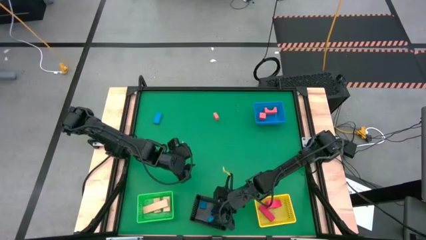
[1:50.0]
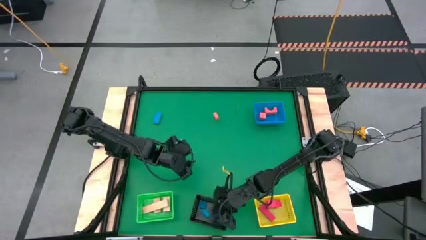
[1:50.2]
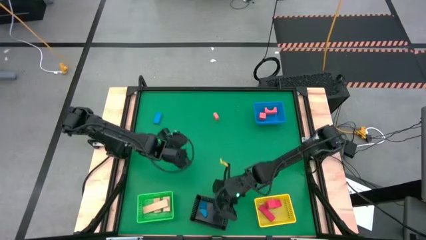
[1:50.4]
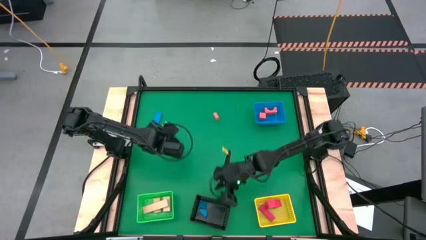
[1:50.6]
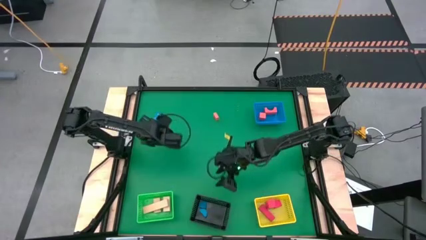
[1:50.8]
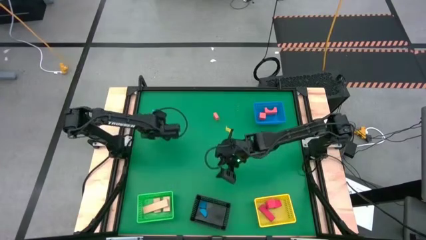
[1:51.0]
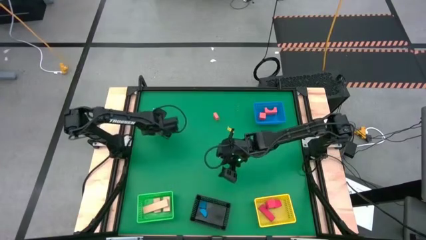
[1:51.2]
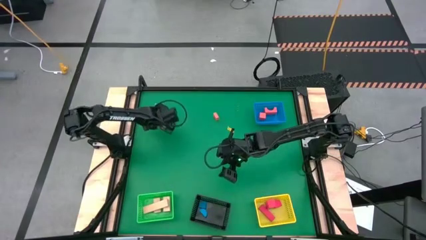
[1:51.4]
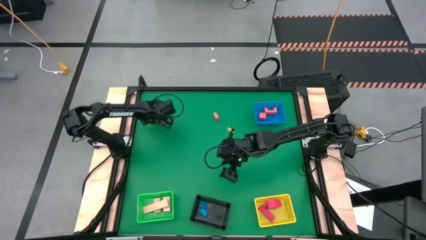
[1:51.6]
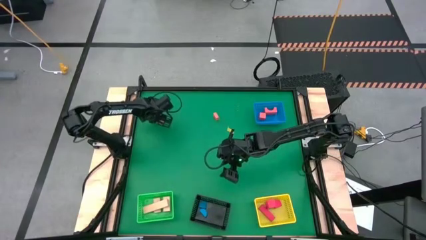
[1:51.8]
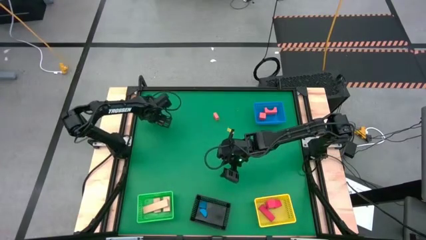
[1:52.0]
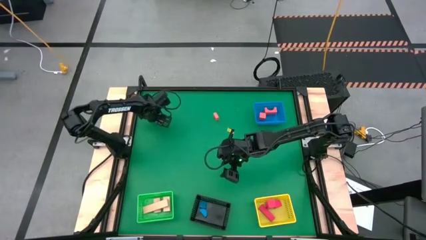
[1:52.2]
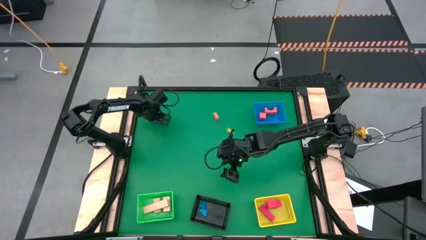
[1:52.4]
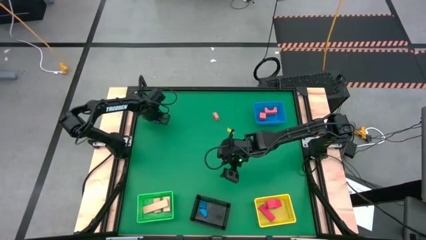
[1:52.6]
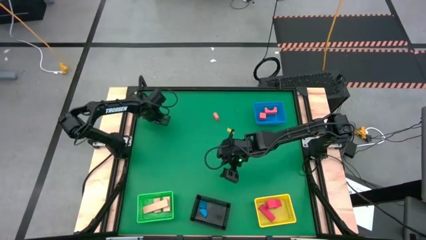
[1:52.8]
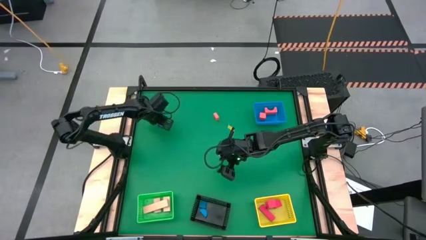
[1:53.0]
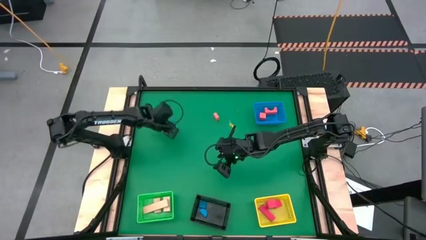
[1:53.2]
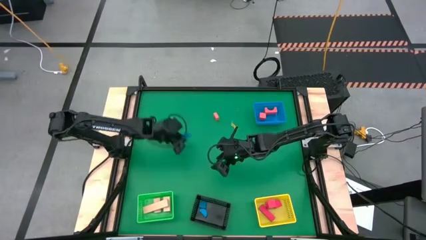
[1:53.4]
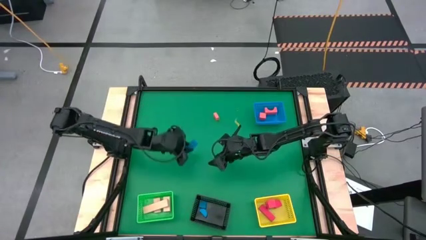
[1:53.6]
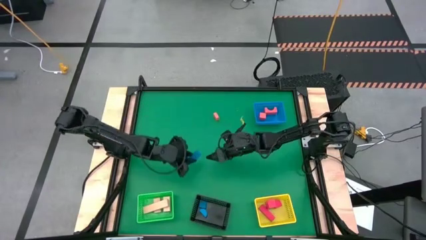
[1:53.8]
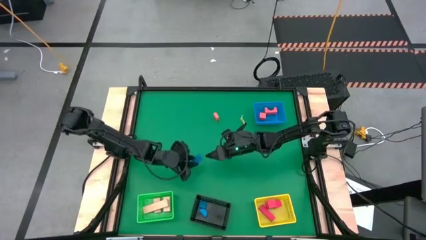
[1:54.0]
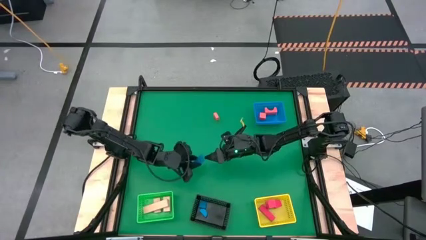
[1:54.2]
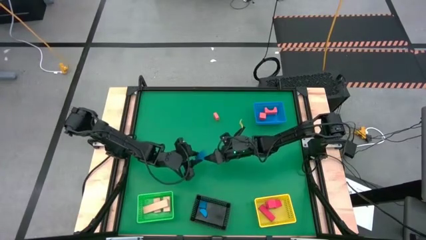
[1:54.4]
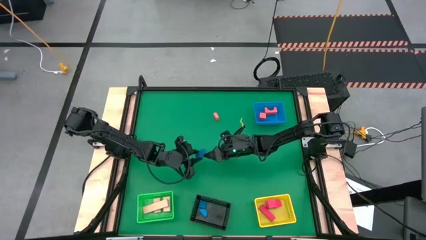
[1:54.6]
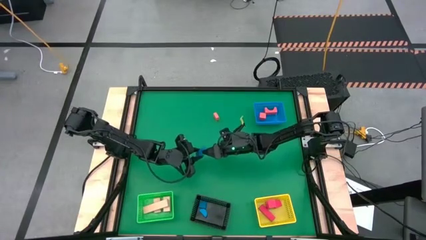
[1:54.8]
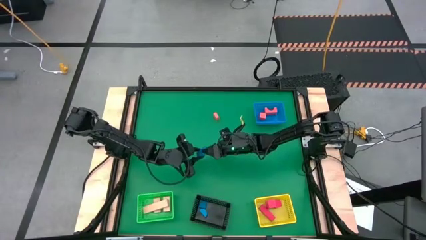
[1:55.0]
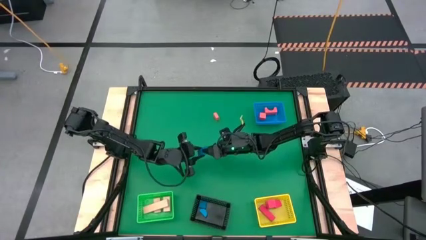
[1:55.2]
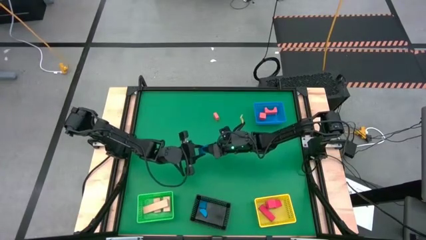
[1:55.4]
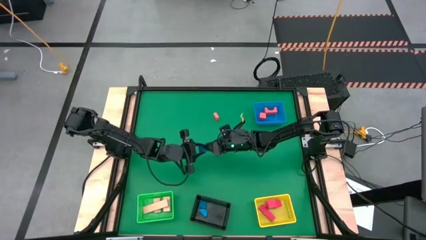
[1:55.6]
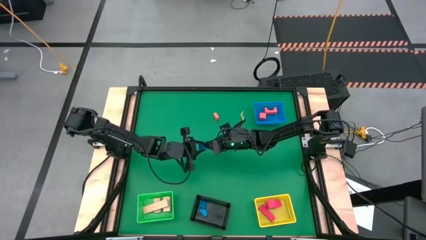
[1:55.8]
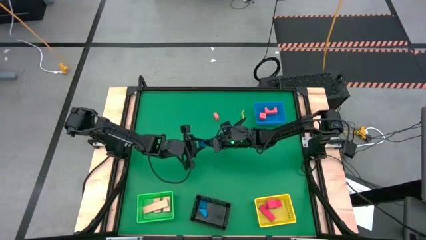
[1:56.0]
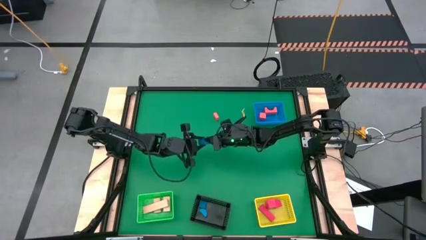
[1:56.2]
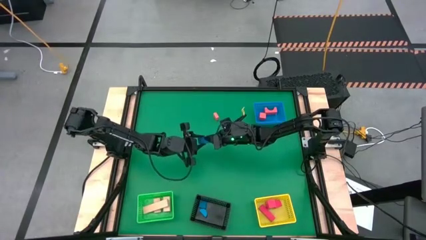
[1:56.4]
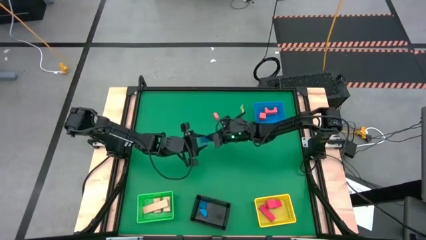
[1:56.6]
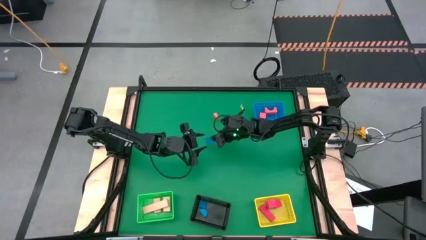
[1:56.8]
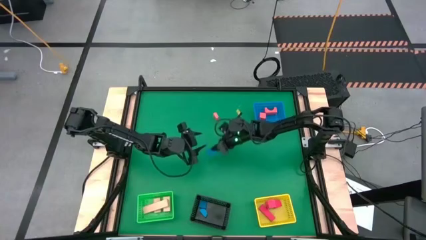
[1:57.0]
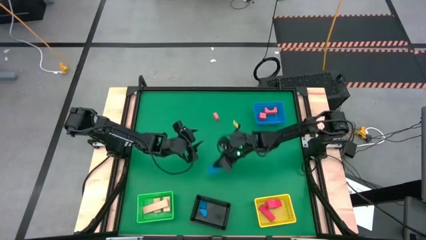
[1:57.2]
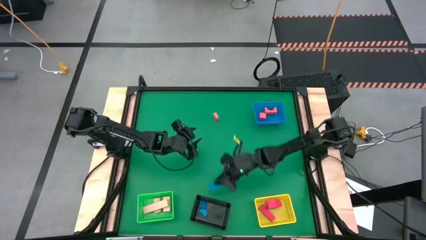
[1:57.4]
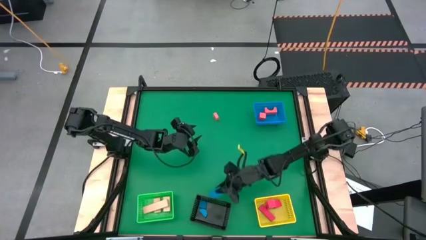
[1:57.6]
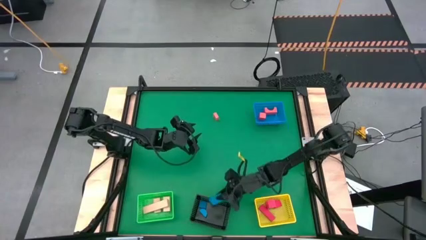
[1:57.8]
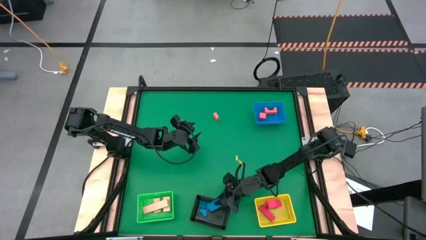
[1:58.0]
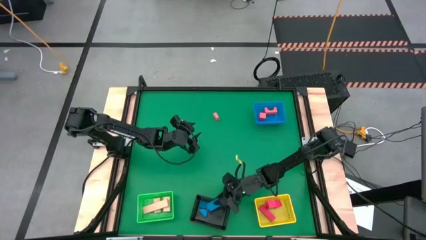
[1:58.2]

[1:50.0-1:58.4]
Task: Sort & place blocks by color
Put the blue block into the black bin

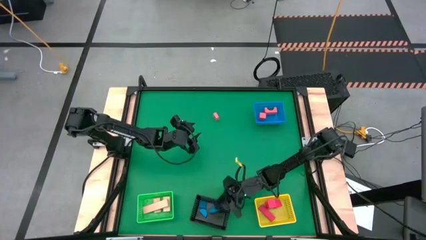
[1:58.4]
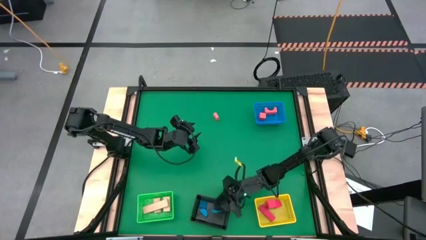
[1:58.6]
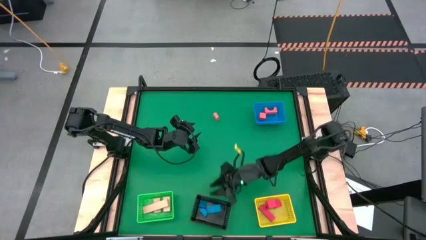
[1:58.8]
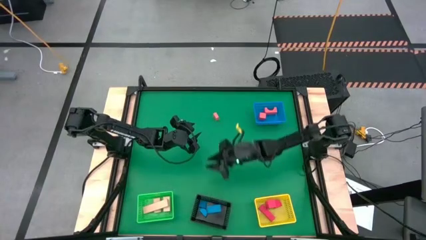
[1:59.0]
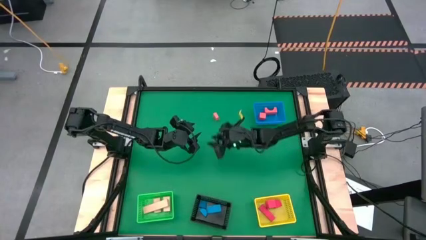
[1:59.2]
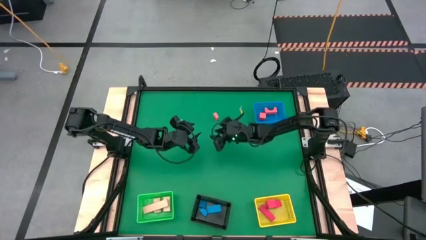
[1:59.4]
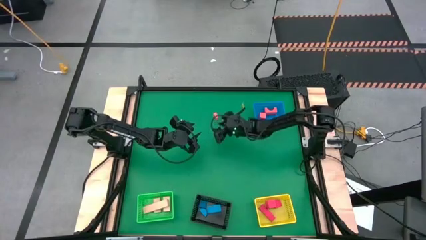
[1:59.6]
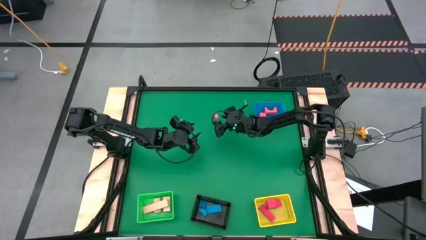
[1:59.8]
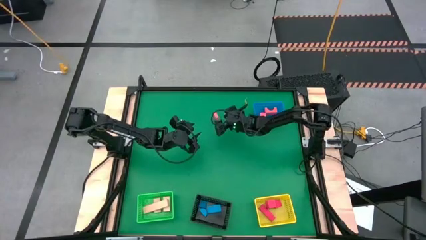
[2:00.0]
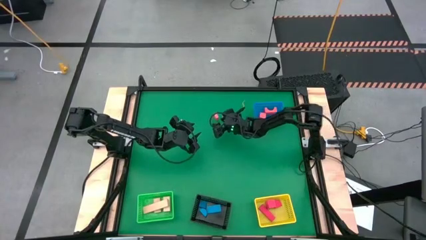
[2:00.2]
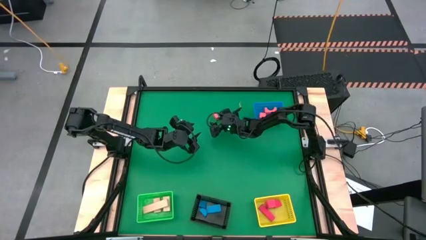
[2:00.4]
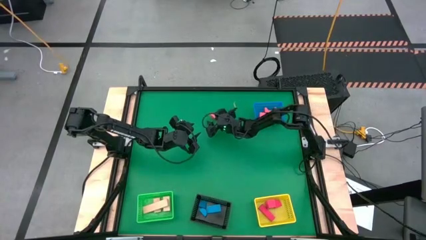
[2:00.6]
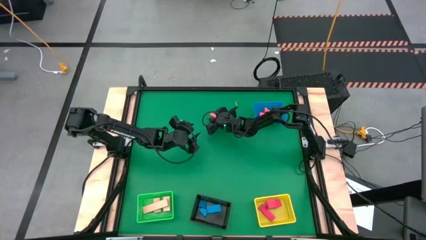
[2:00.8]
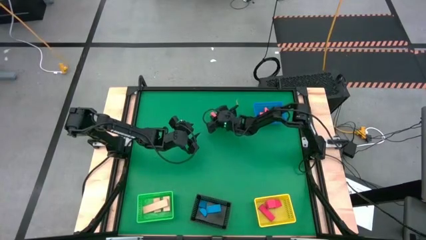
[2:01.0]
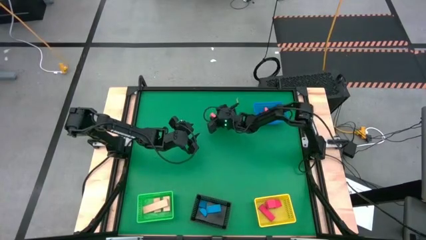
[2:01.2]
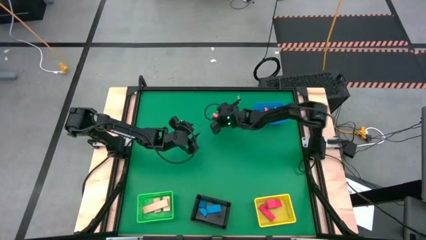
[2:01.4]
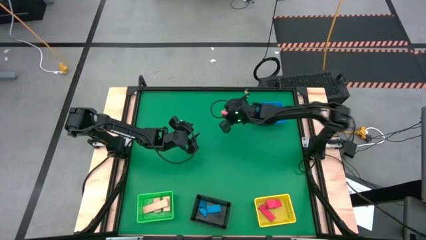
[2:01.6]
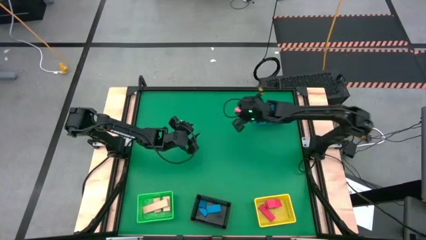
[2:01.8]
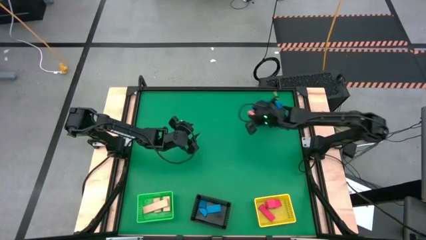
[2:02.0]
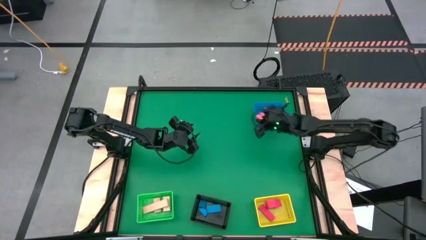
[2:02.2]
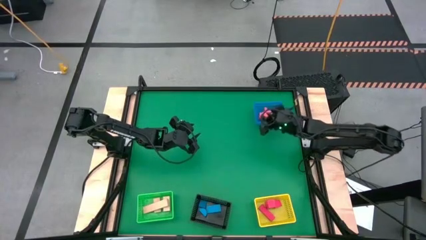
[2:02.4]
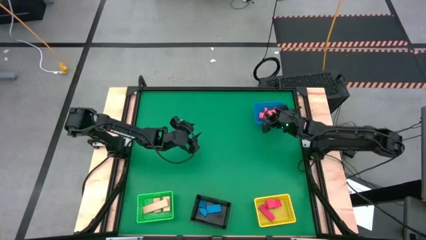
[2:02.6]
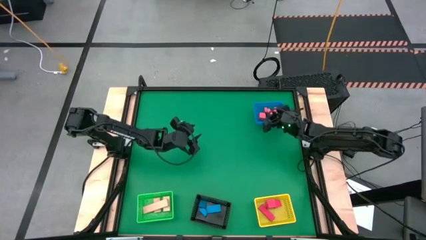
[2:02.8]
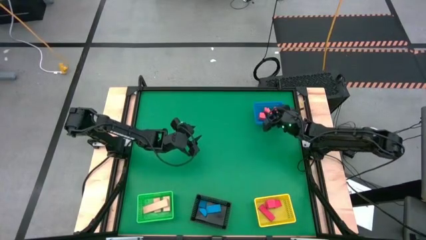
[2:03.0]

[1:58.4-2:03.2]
Put the orange block into the blue bin

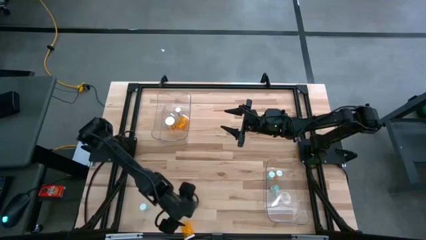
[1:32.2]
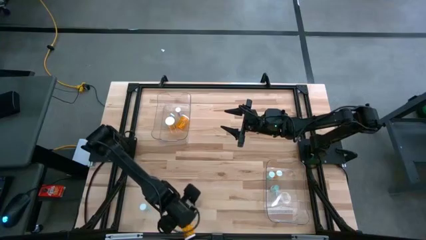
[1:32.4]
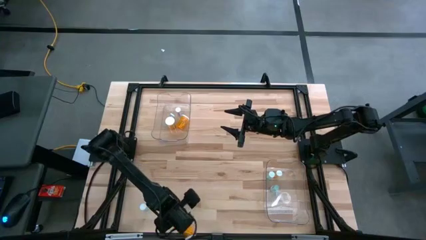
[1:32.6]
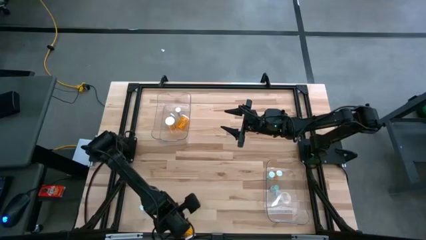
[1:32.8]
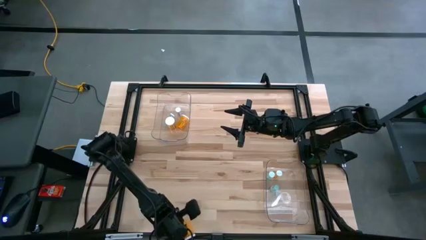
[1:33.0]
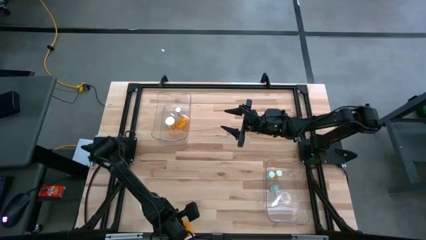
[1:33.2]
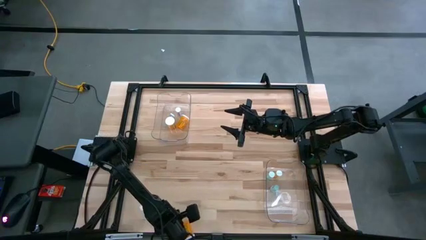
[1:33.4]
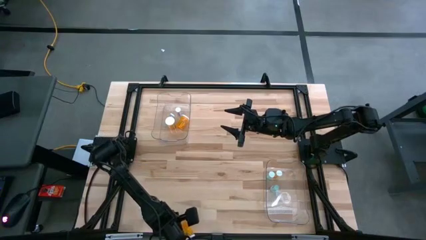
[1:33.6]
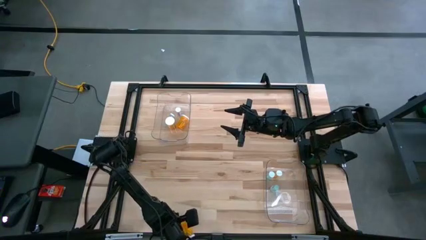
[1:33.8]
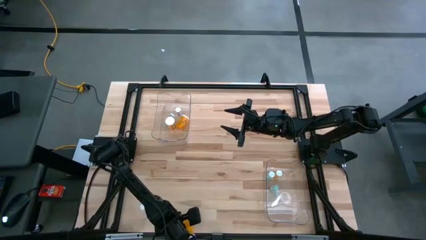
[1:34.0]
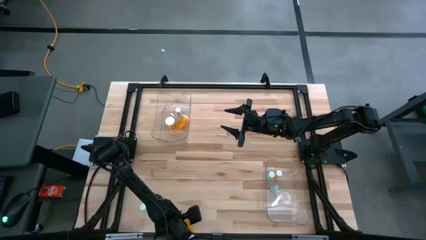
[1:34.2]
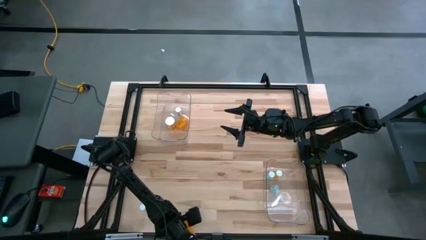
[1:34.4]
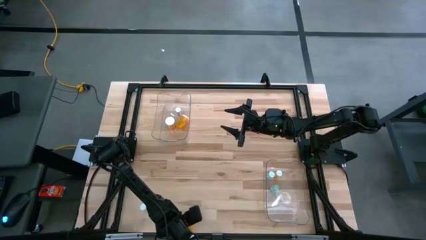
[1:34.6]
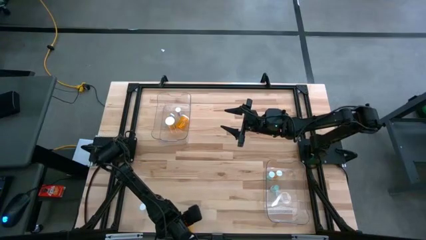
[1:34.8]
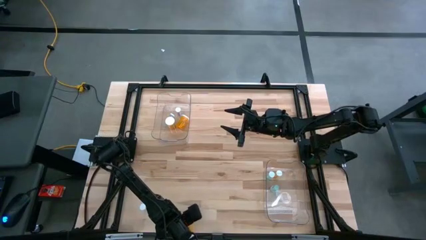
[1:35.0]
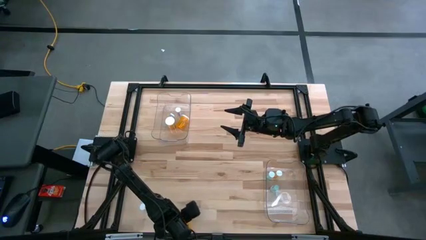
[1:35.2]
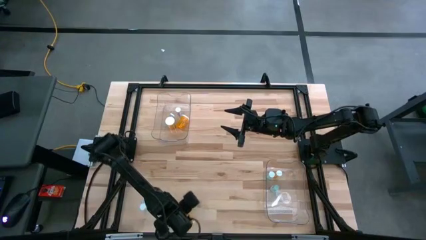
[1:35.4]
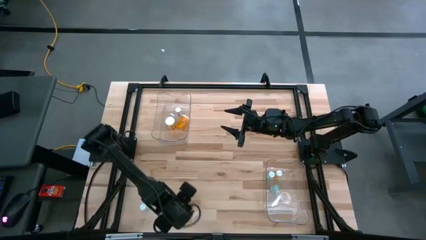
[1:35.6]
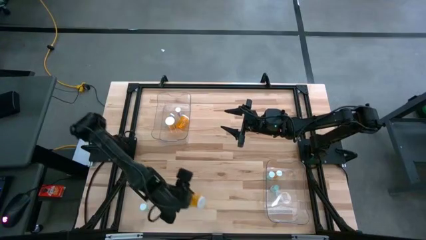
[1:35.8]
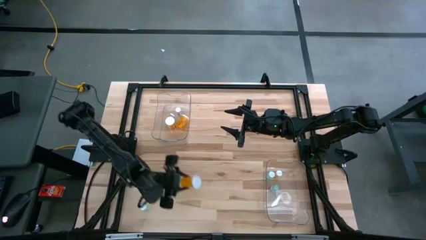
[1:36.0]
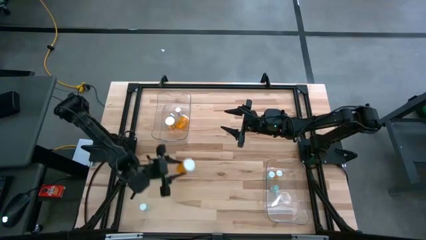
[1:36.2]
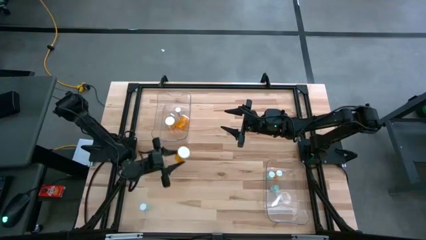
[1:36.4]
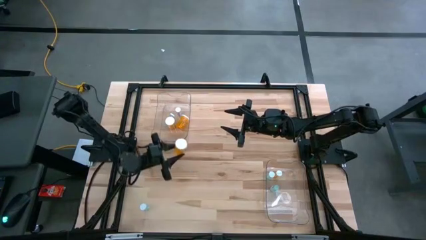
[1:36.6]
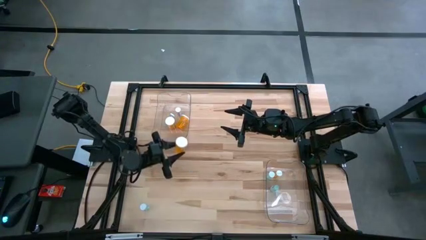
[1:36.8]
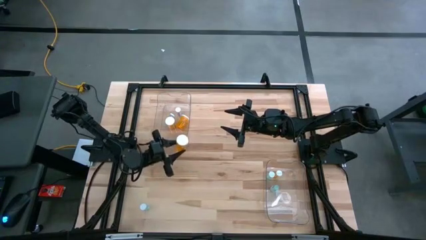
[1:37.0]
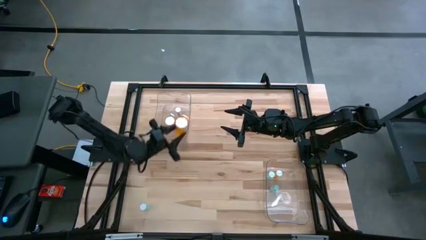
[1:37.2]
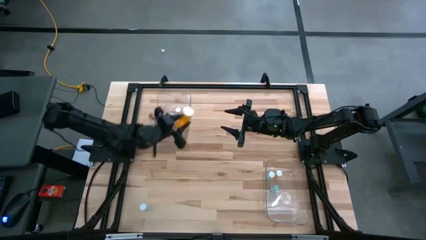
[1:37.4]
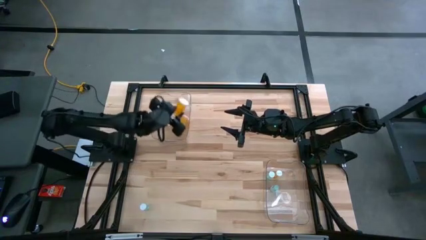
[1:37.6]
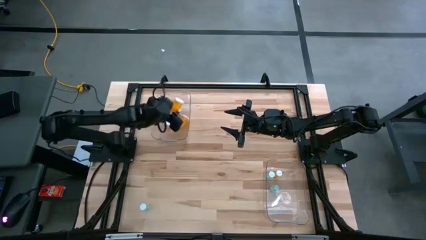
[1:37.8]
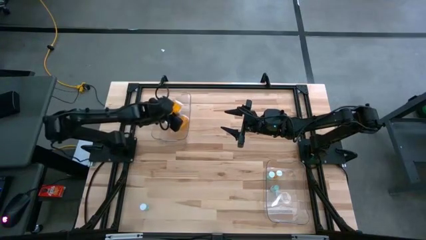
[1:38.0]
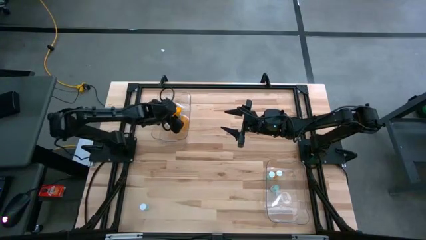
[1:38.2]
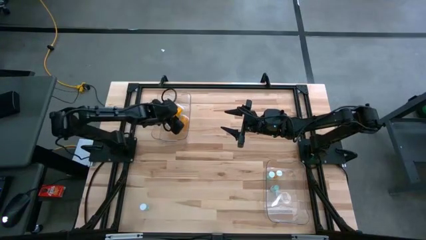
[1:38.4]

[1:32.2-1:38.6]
Task: Pick and place medicine bottles into bin by pill shape (circle, oval)
Put the orange capsule bottle into the left transparent bin
